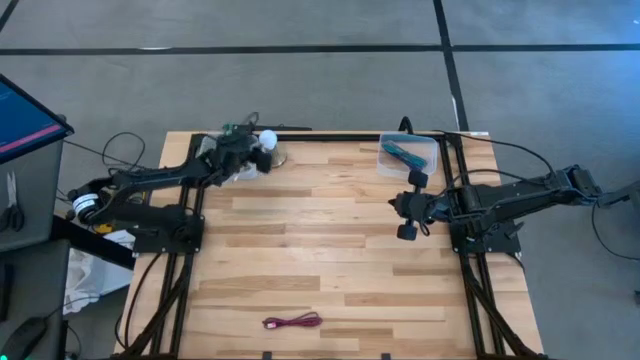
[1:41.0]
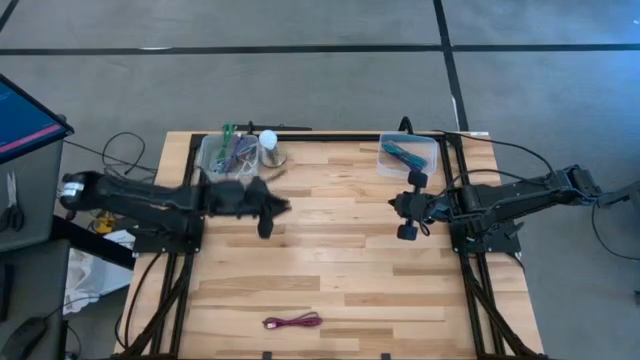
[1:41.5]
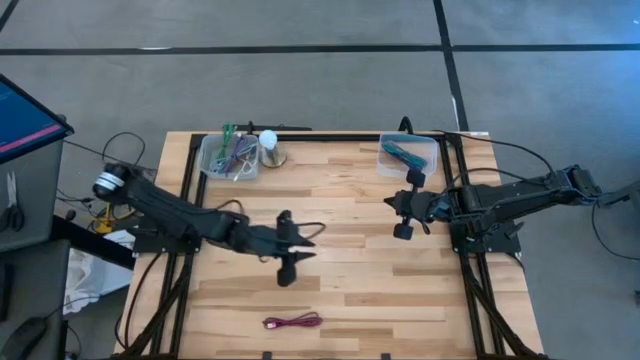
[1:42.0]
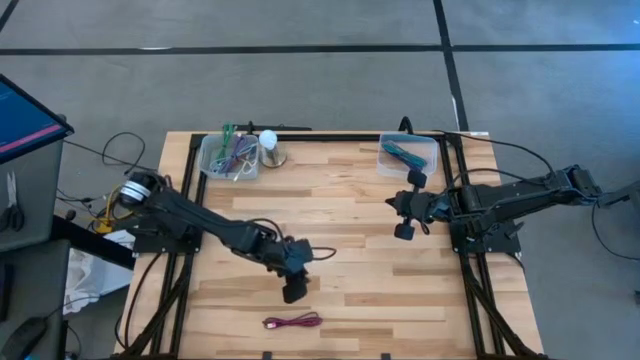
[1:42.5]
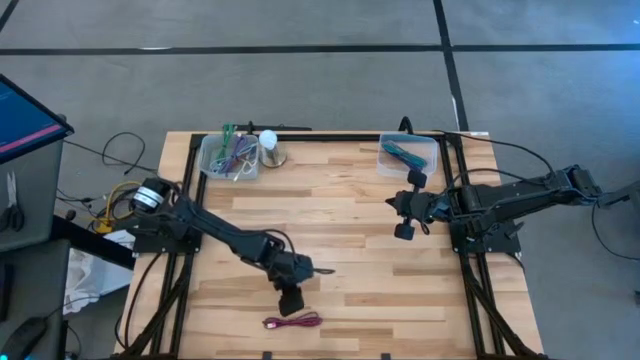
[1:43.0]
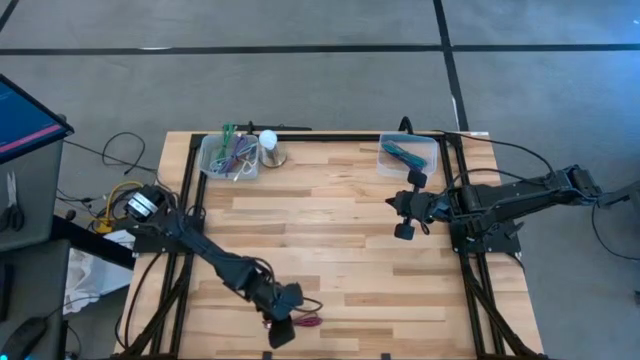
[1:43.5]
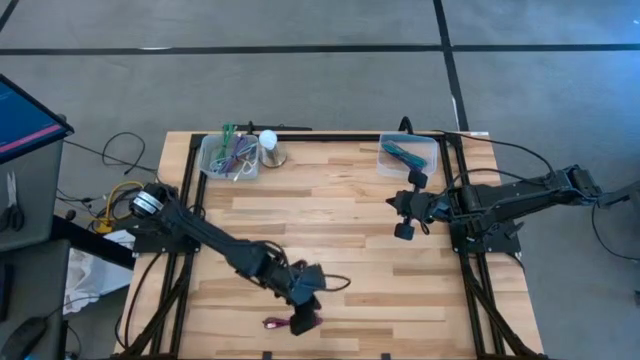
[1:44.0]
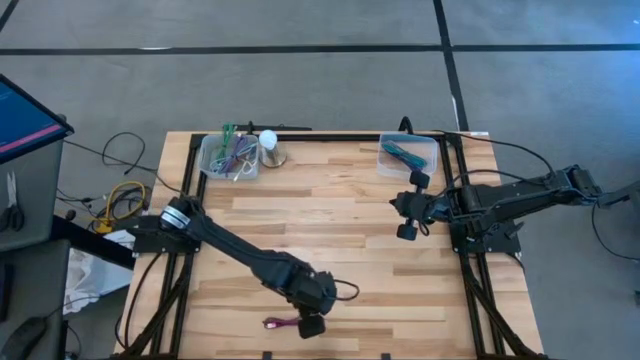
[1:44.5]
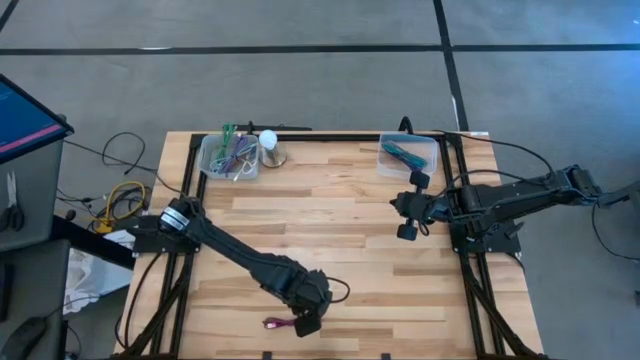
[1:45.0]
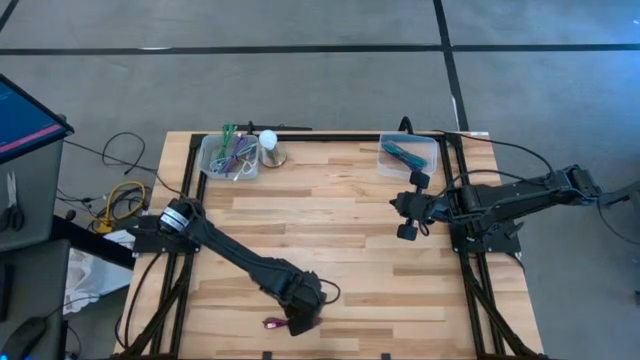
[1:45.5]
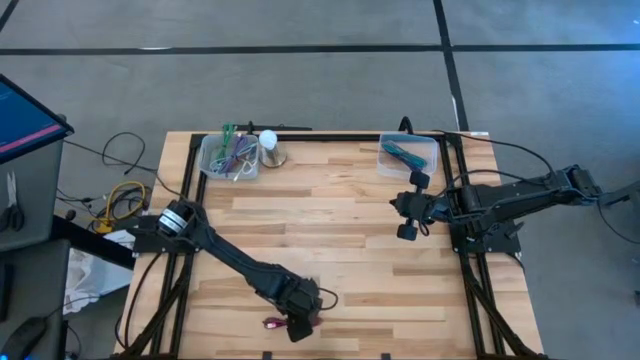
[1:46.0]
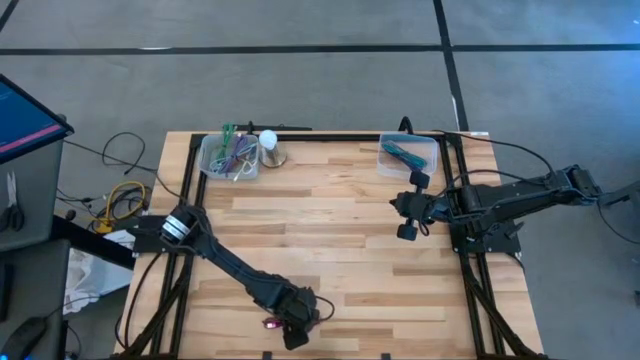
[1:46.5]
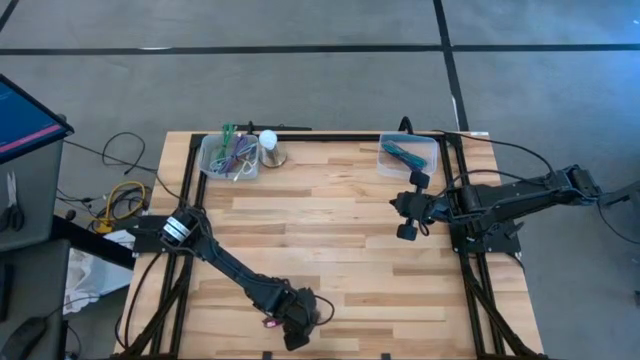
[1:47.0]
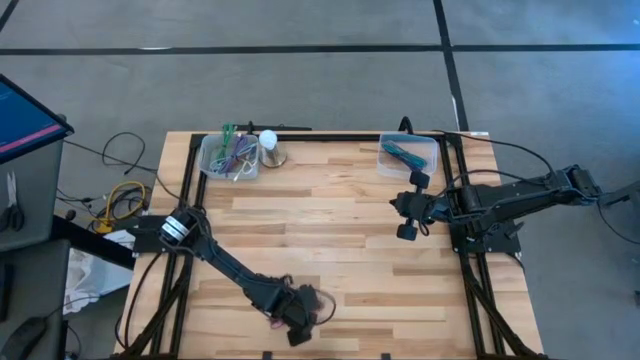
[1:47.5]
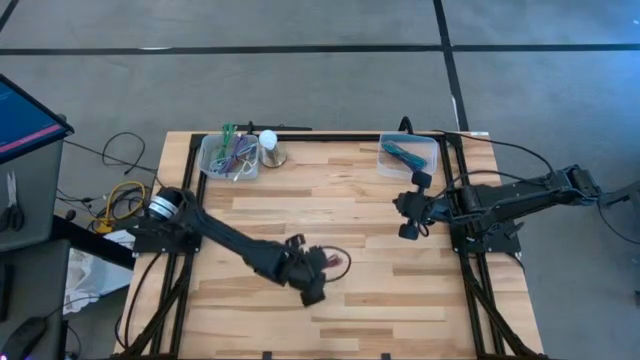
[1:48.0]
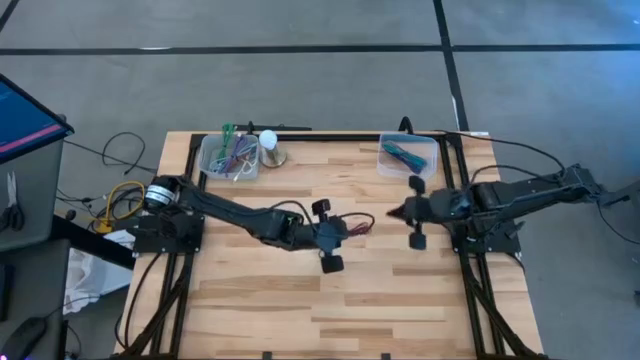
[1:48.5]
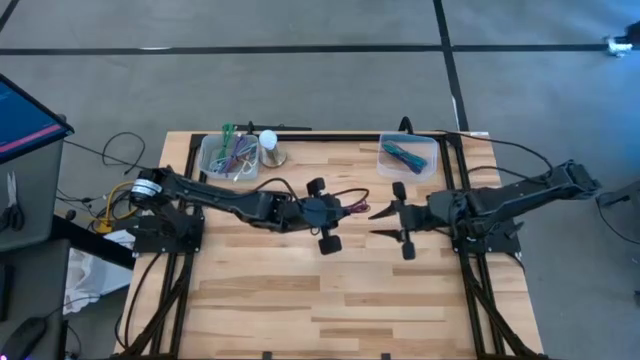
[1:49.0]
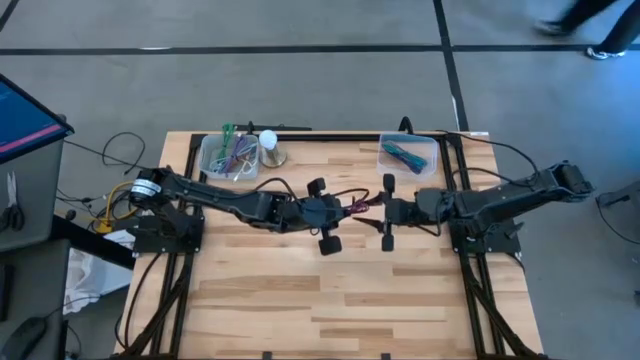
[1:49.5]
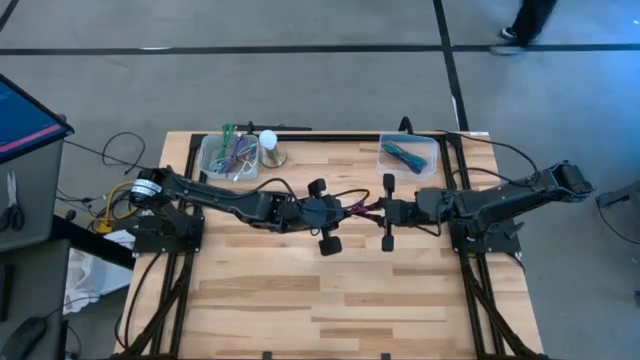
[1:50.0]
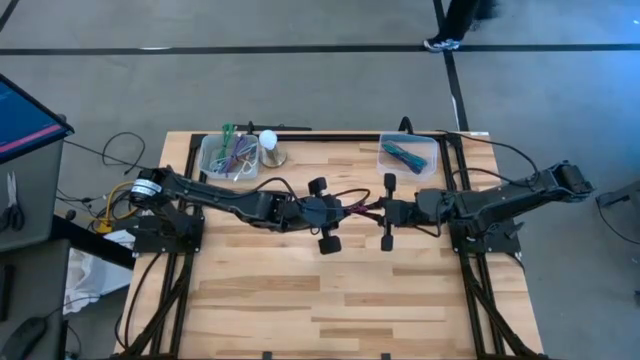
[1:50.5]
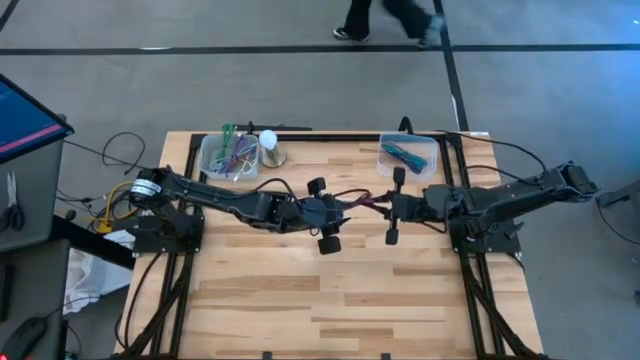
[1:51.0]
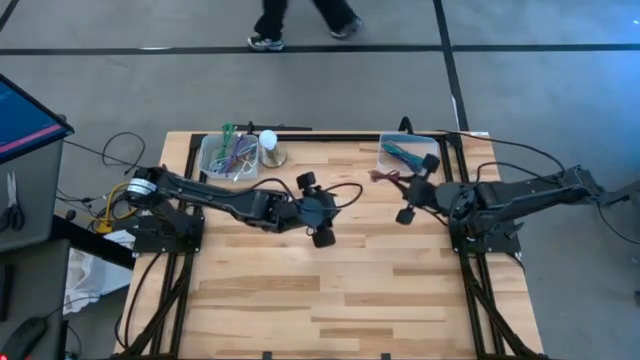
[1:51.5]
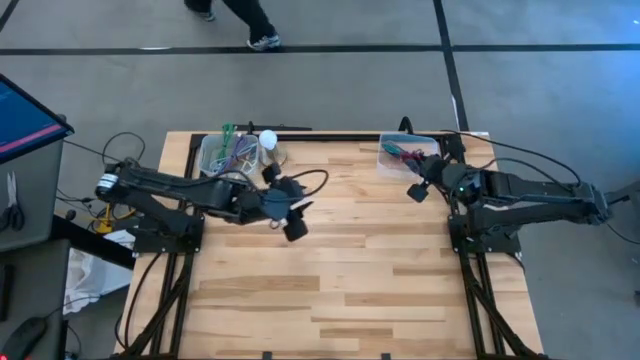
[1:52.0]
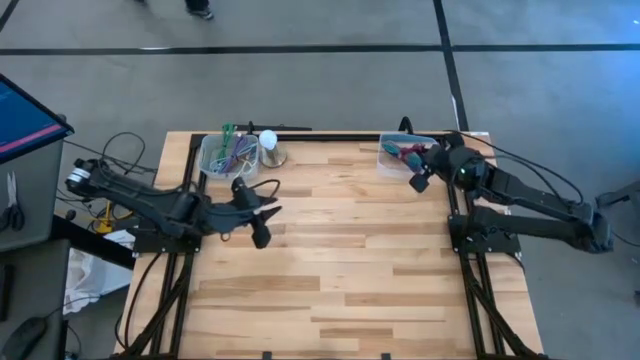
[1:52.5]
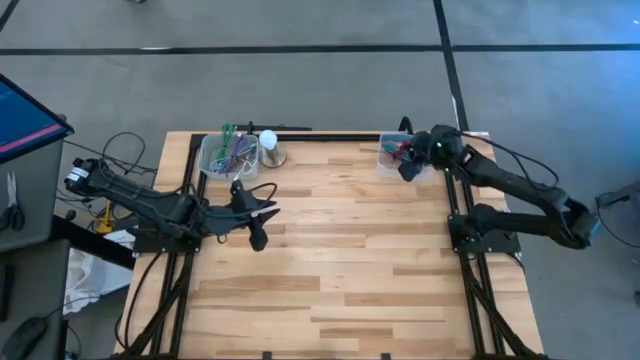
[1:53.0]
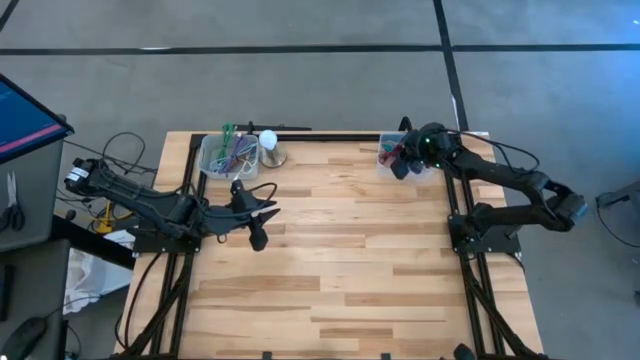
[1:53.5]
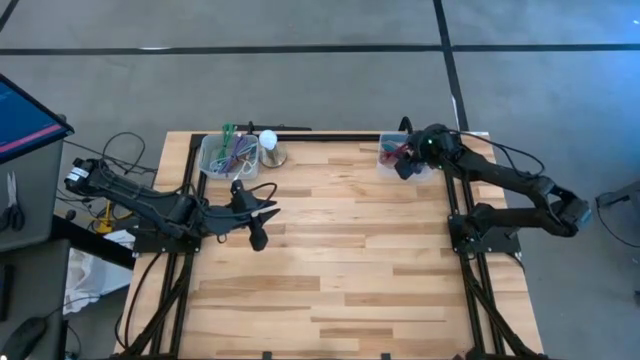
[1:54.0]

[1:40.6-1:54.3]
Task: Pick & Place USB Port
Put the pink patterned charger cable into the transparent bin

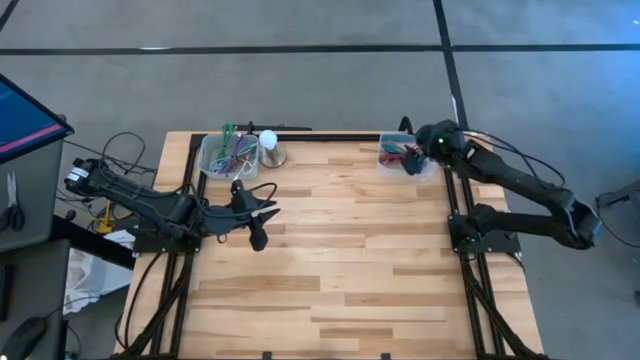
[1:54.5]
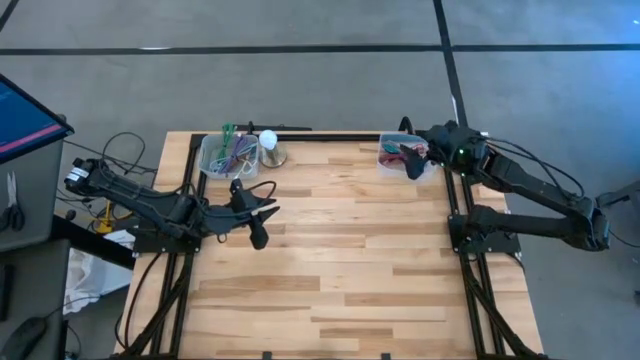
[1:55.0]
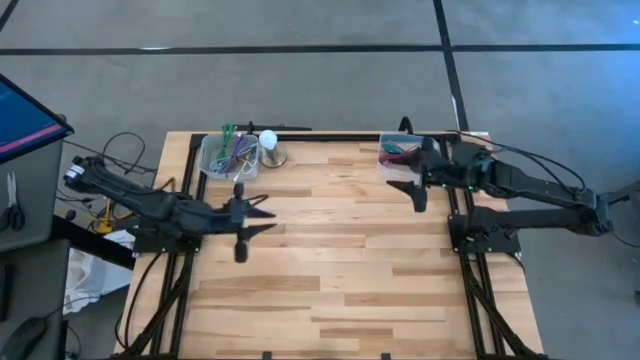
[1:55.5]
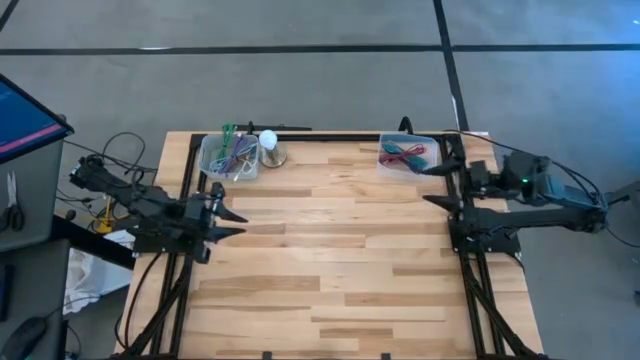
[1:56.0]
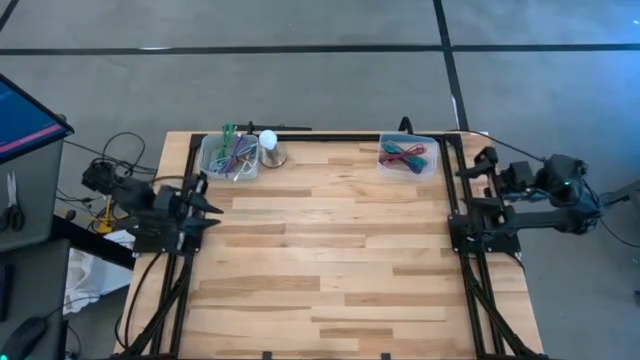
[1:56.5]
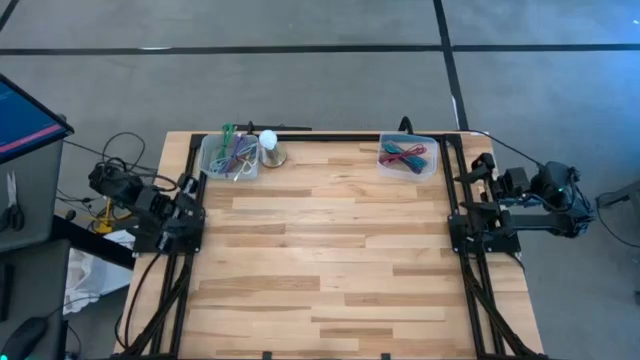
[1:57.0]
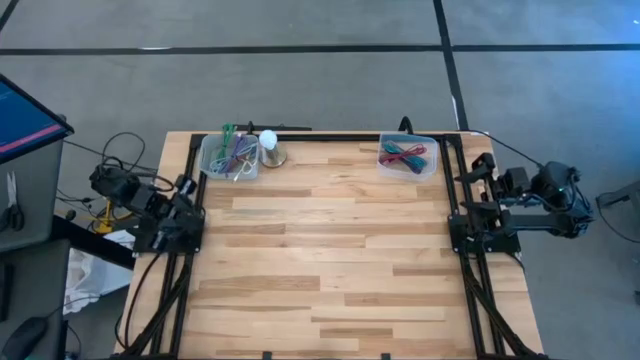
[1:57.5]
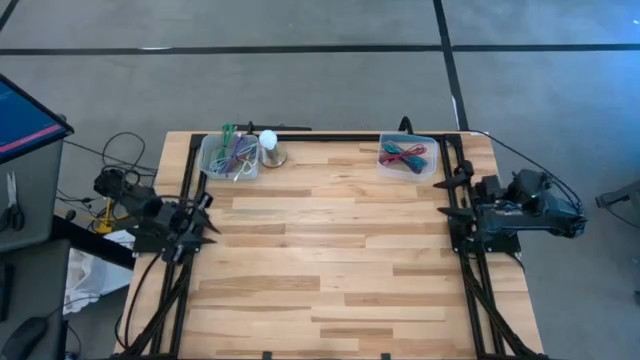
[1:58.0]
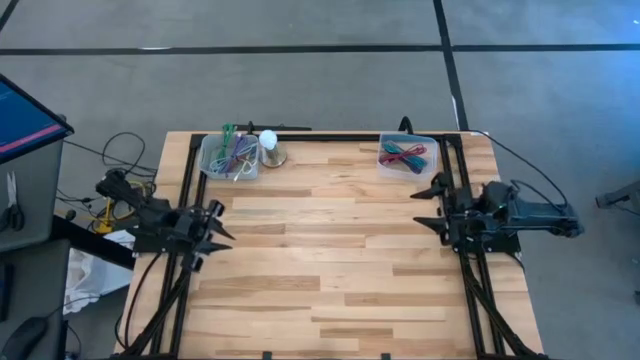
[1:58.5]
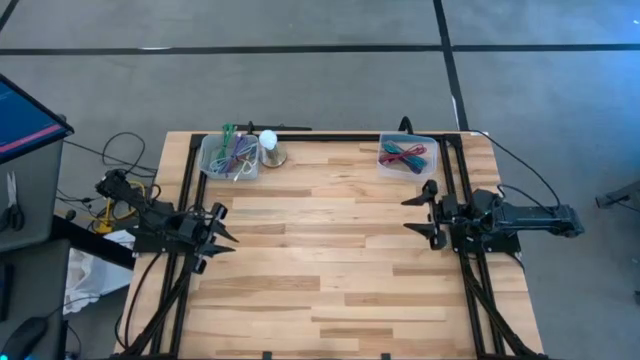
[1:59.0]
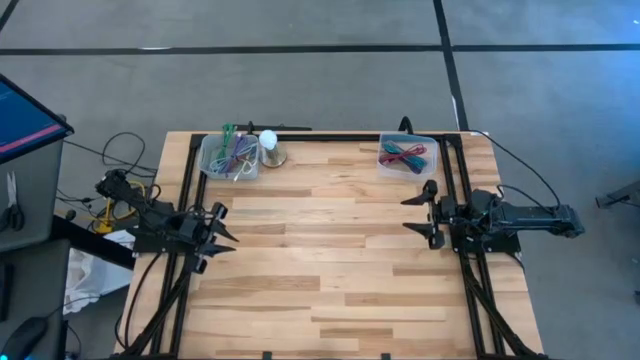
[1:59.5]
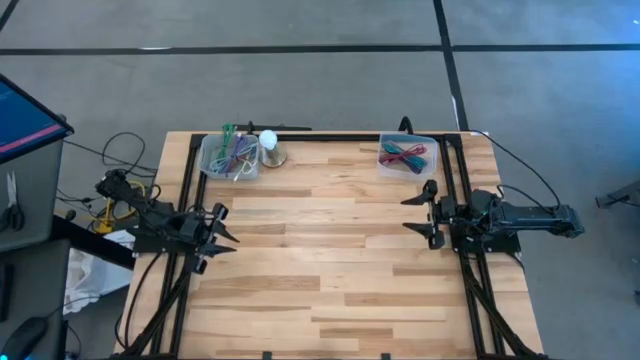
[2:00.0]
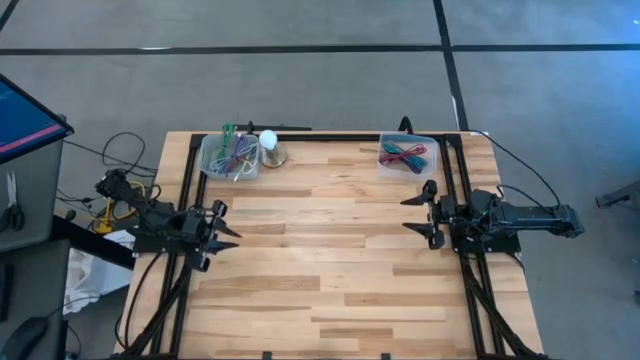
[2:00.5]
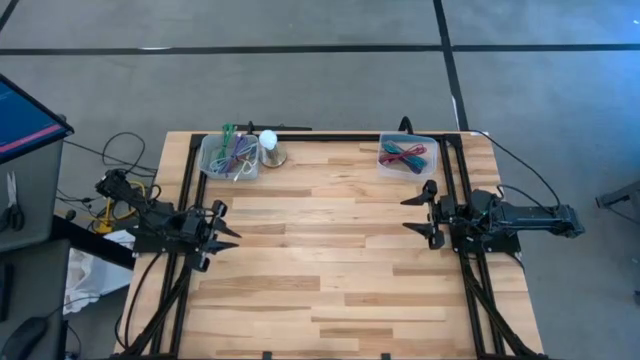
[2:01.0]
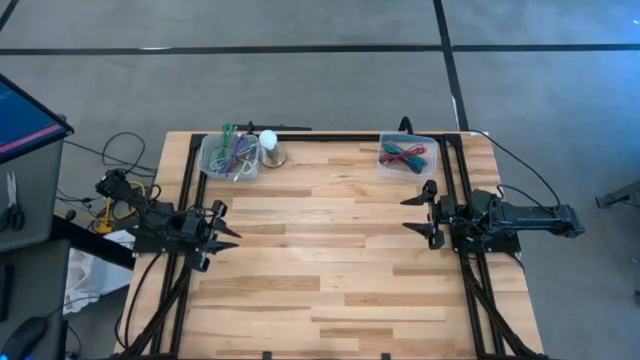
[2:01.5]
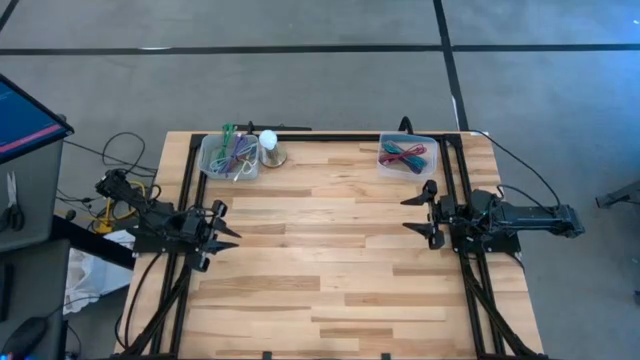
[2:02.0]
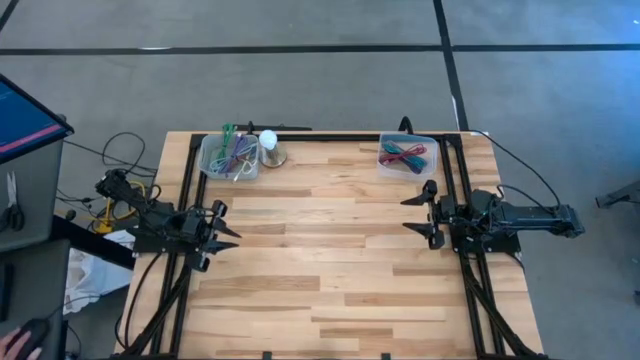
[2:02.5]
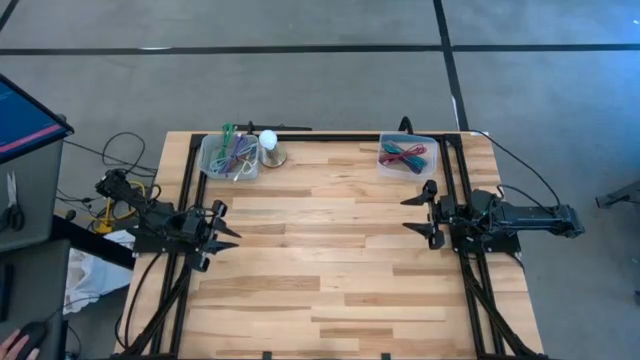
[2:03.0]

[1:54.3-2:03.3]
Return to Home Position
